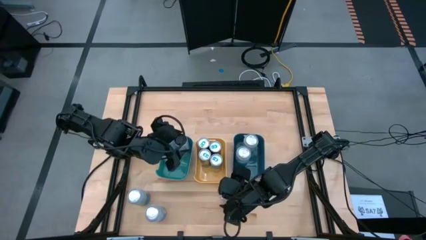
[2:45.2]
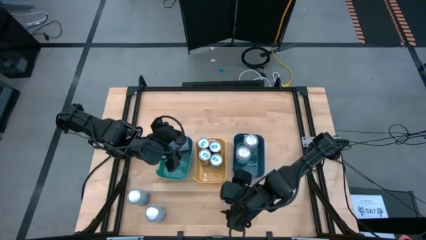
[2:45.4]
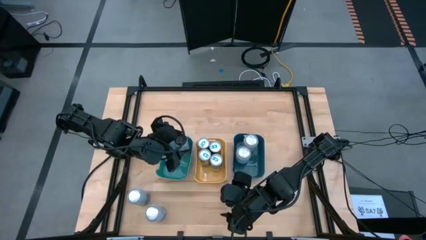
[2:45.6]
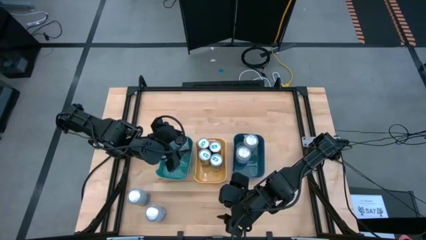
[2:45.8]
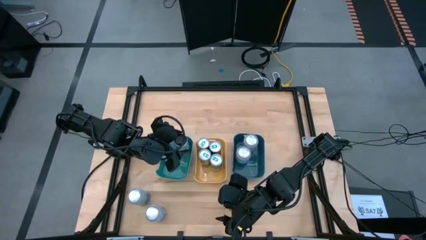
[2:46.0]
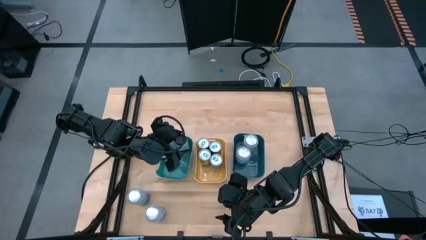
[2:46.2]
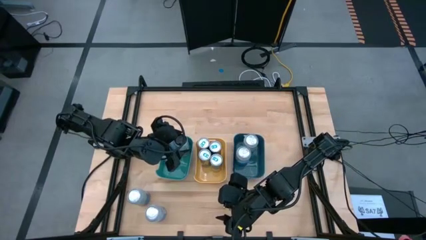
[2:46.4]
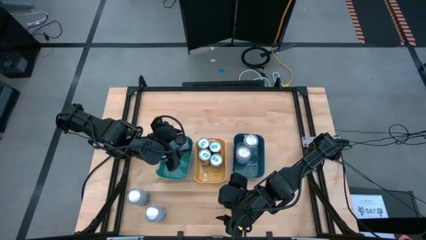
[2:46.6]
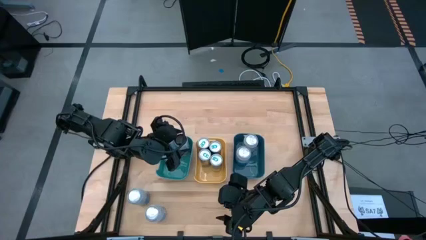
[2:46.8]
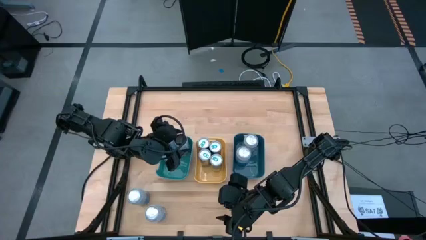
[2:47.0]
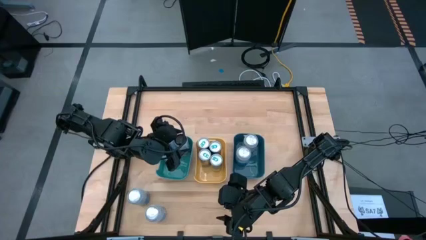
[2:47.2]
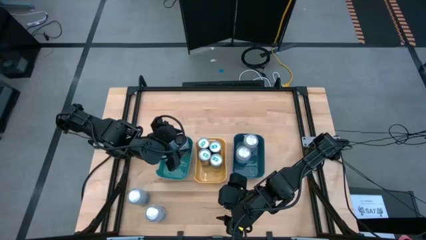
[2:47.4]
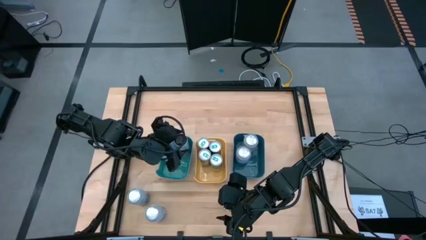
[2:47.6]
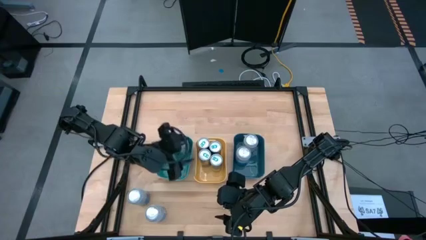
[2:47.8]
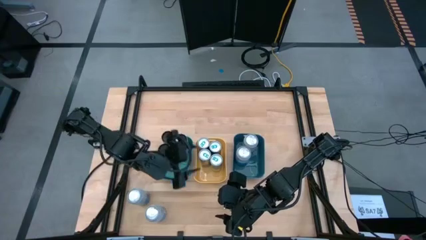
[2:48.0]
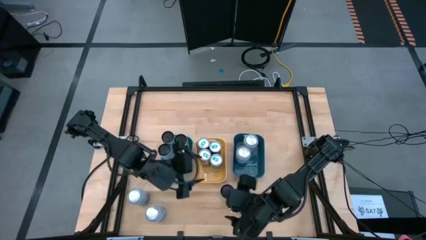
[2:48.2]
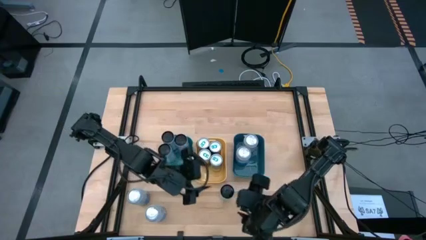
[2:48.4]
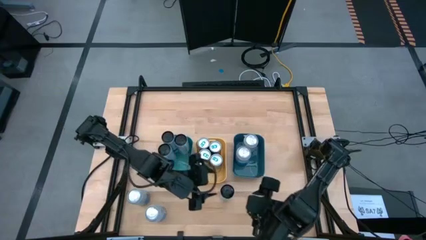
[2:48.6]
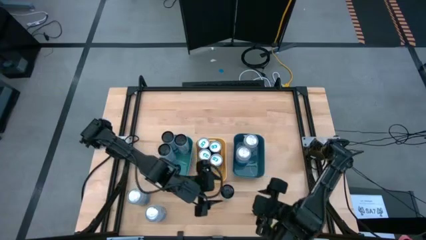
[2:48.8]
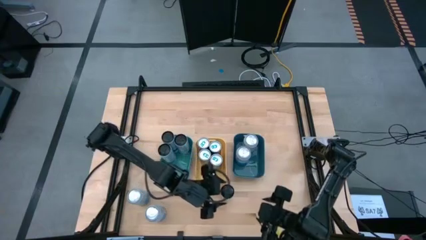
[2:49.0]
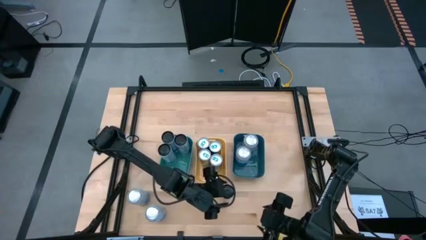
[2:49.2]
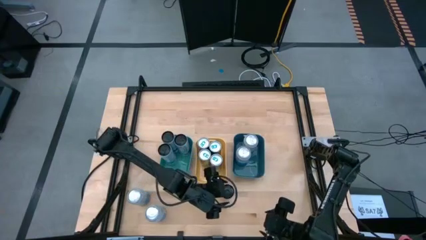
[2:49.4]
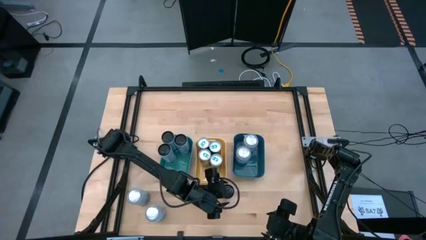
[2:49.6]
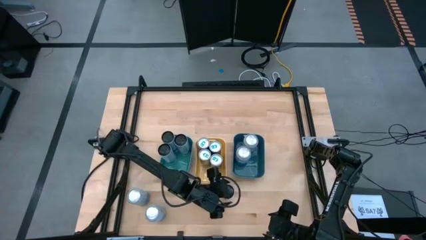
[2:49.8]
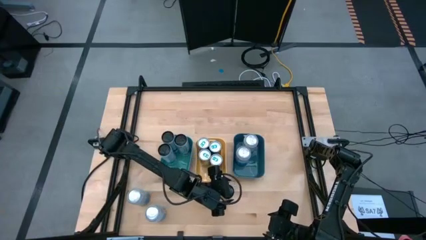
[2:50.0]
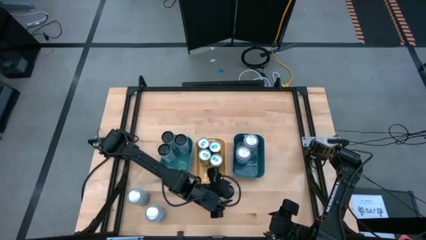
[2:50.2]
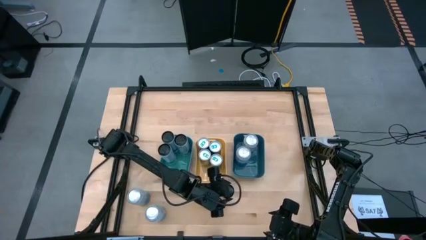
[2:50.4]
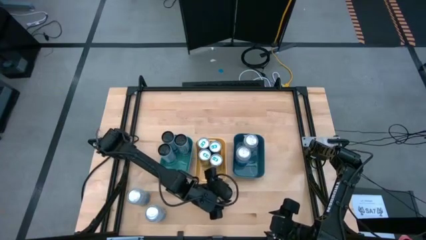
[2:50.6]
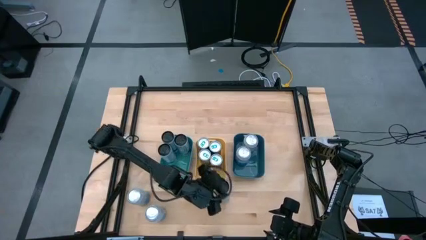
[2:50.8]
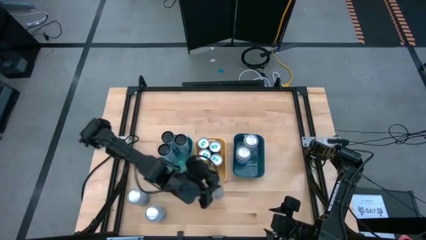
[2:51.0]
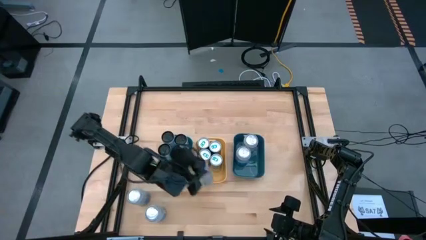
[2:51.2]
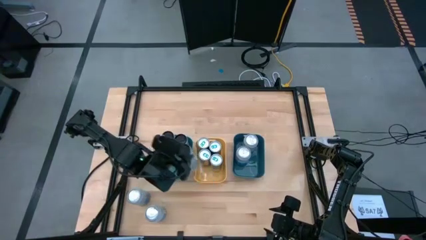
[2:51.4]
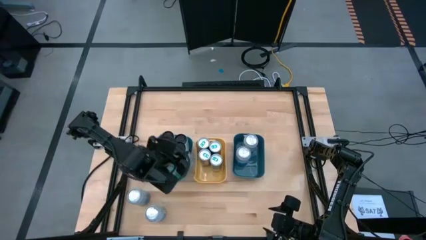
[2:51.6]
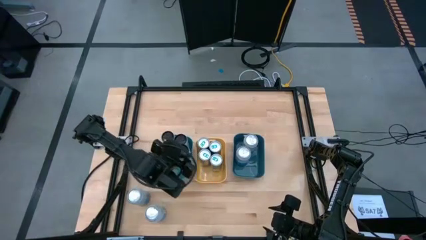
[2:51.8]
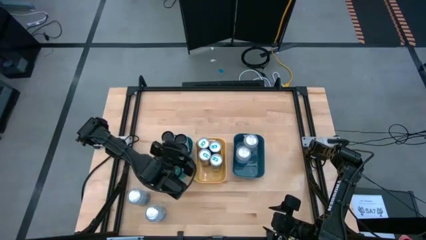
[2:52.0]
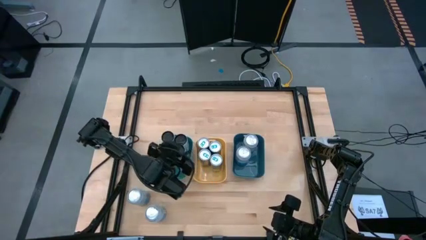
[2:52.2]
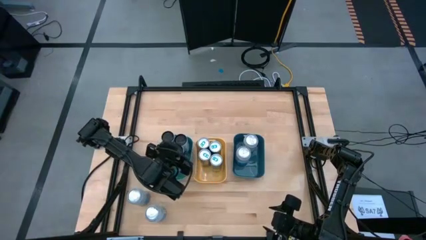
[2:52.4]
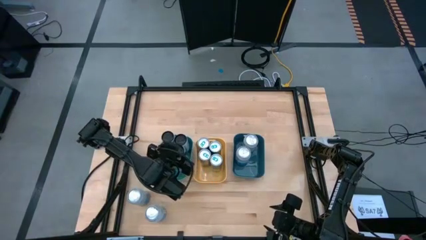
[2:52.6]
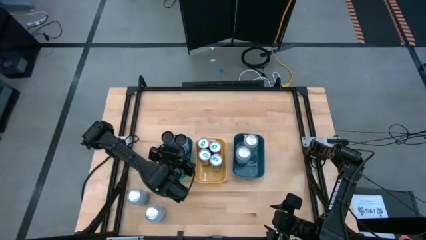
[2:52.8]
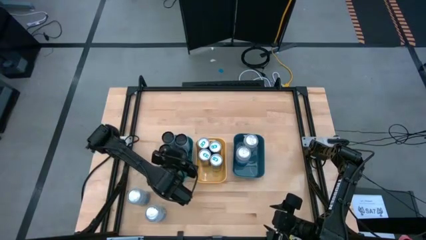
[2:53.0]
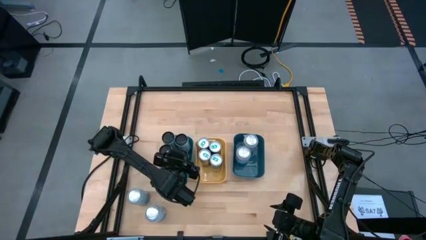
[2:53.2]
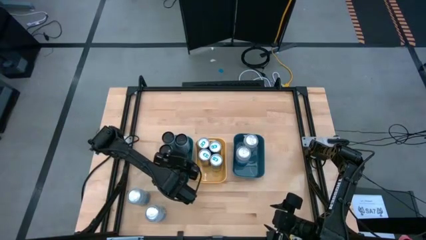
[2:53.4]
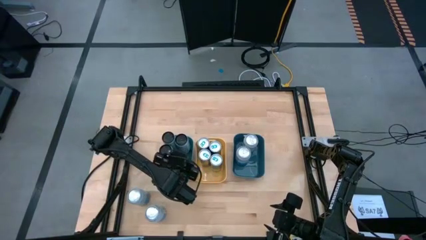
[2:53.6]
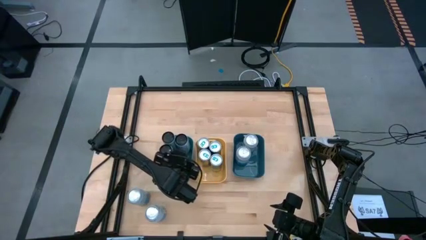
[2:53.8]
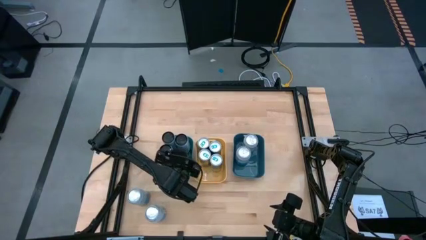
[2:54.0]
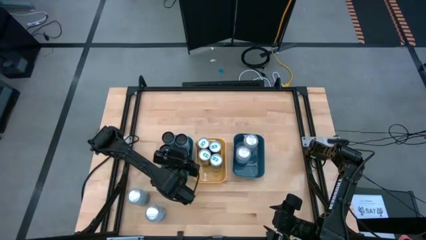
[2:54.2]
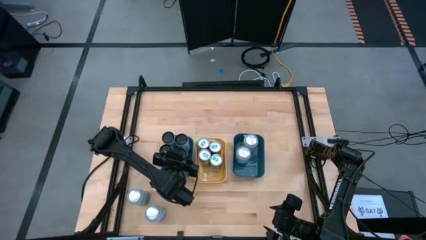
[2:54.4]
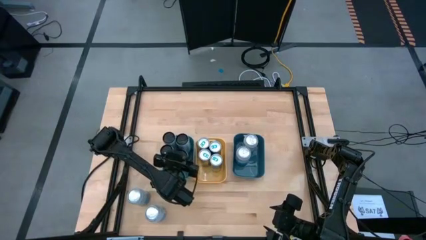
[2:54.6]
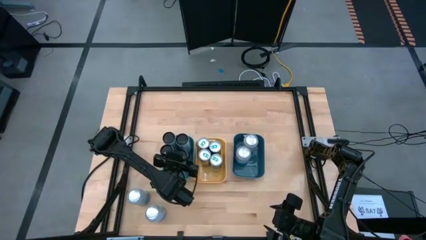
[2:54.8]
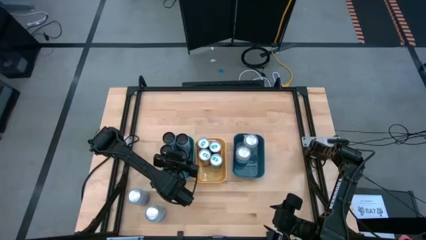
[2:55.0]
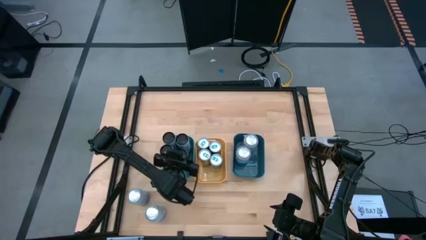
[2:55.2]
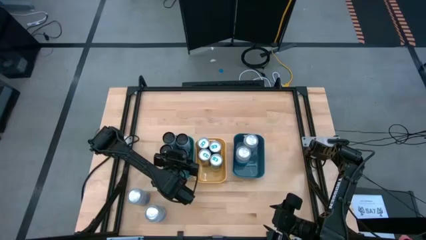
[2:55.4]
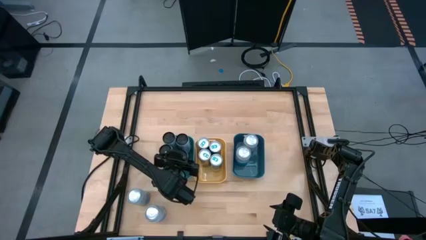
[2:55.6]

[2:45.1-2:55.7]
Task: Sort soda cans
Put the upper right black can into the light green bin
